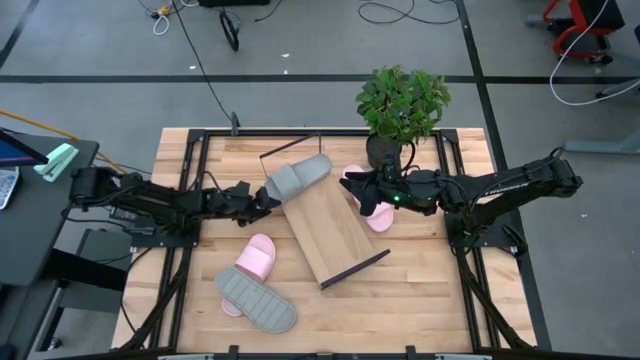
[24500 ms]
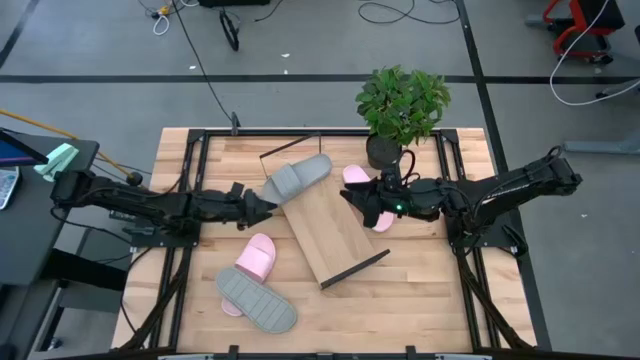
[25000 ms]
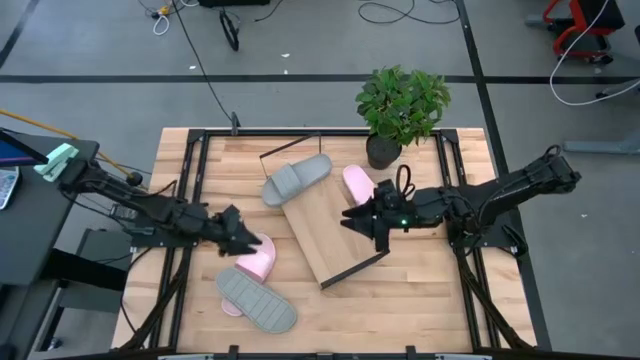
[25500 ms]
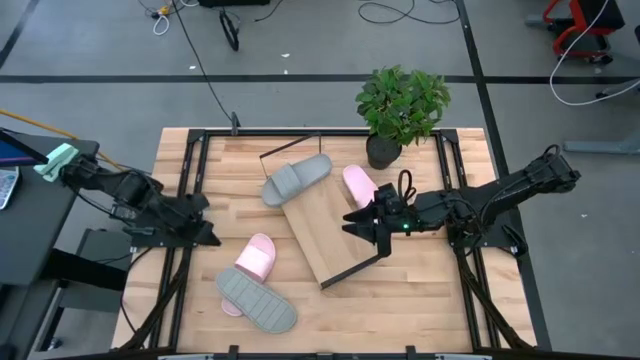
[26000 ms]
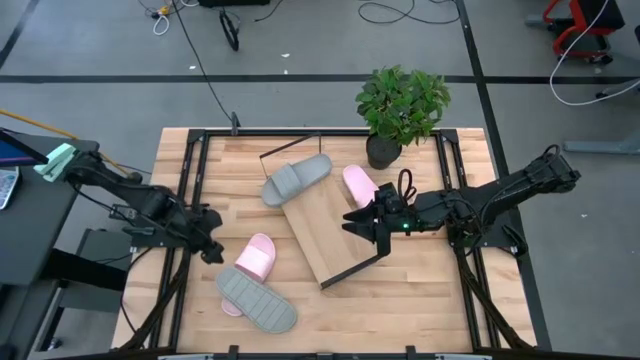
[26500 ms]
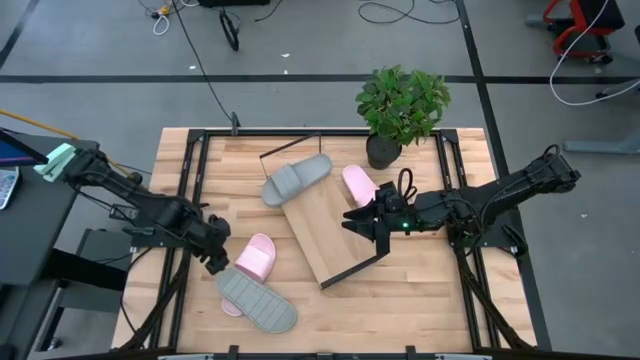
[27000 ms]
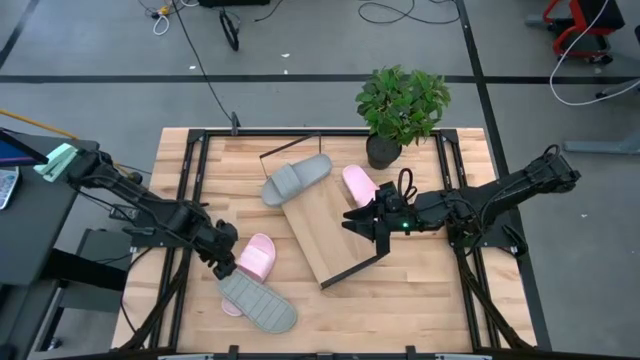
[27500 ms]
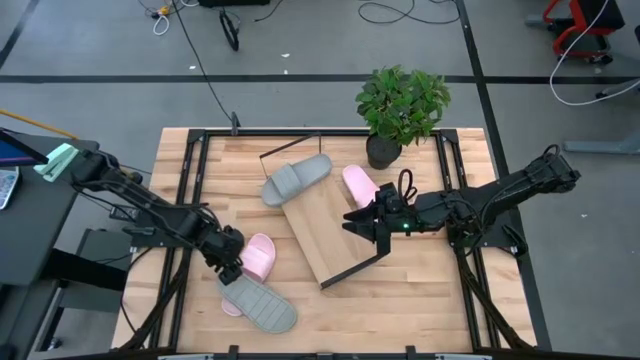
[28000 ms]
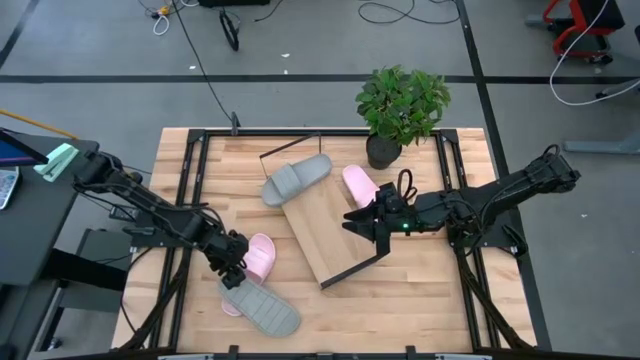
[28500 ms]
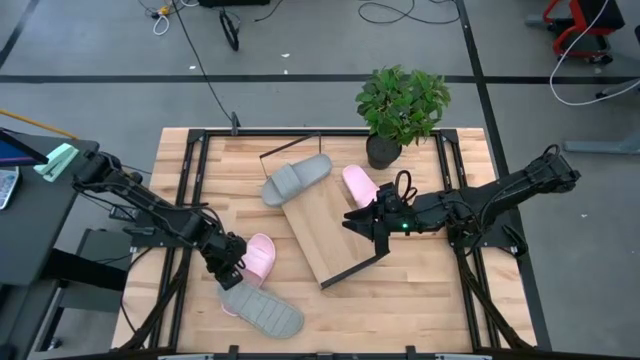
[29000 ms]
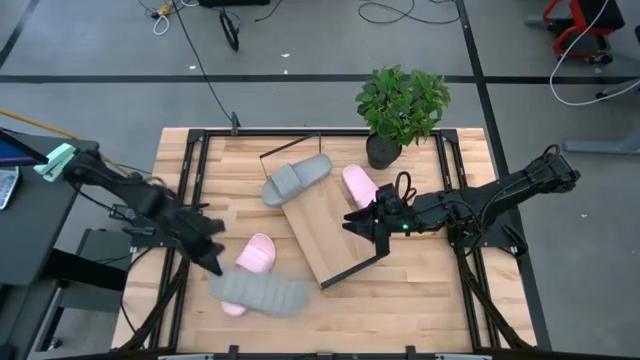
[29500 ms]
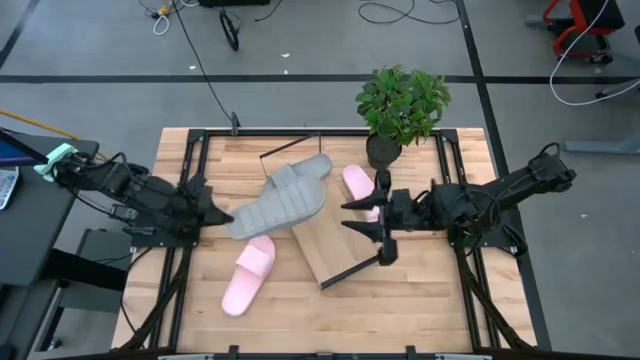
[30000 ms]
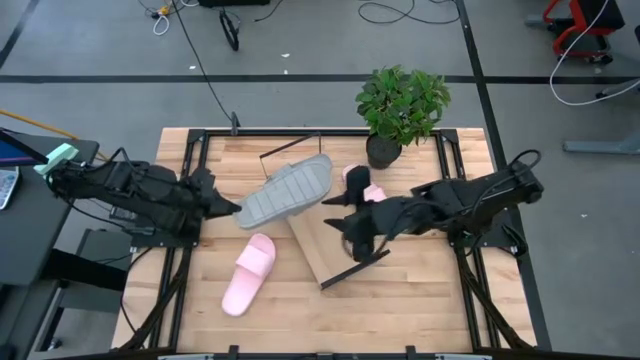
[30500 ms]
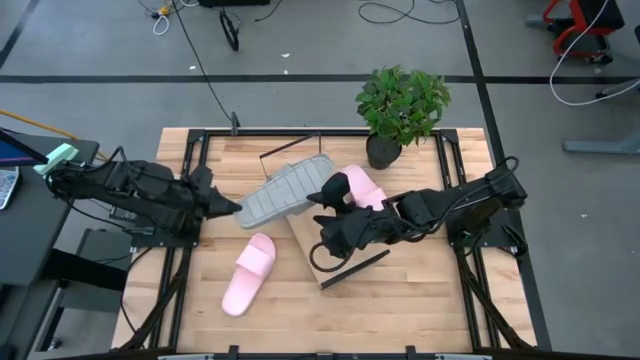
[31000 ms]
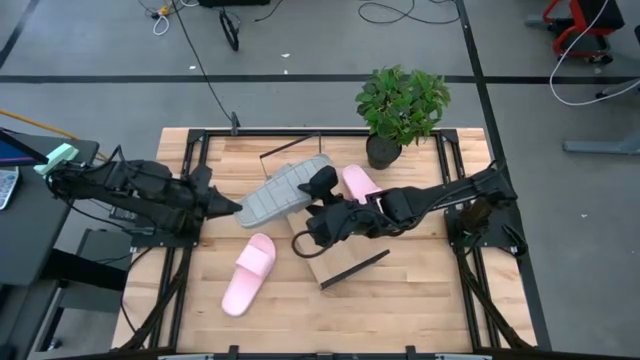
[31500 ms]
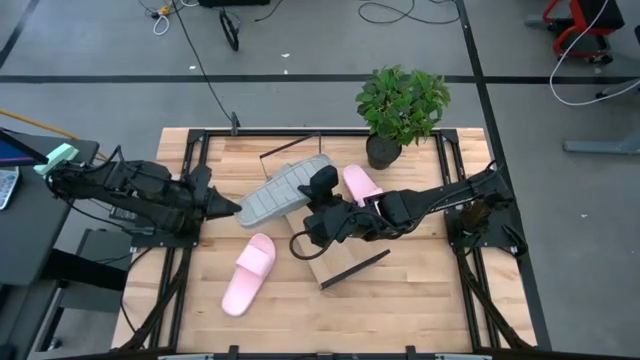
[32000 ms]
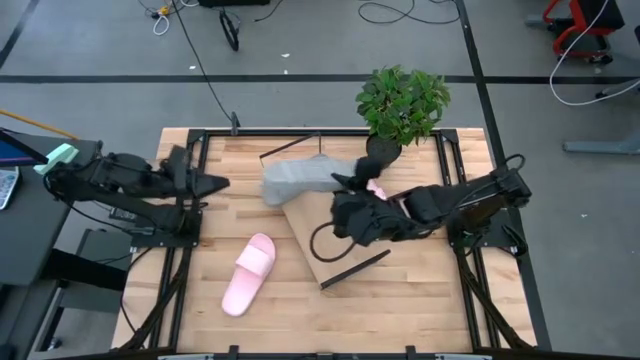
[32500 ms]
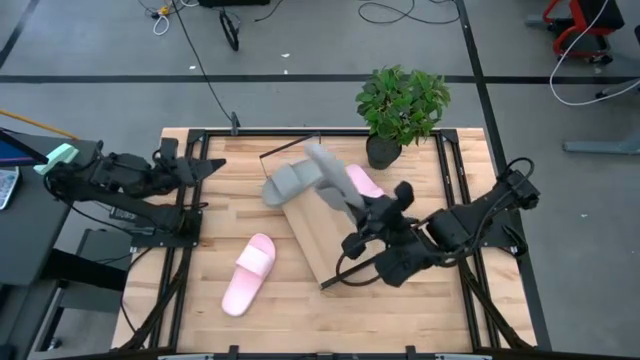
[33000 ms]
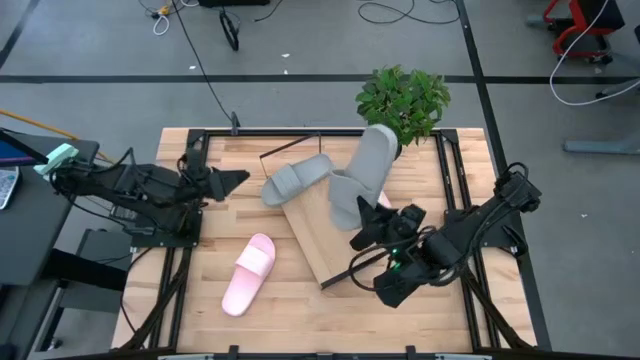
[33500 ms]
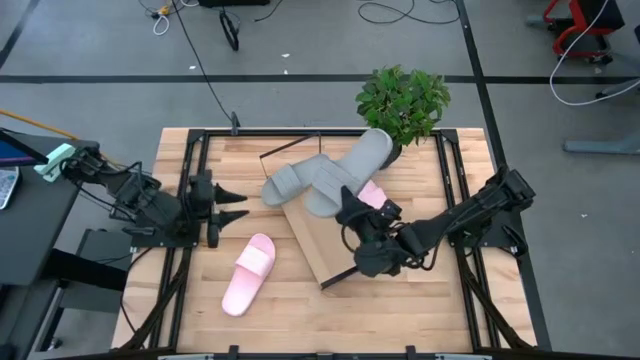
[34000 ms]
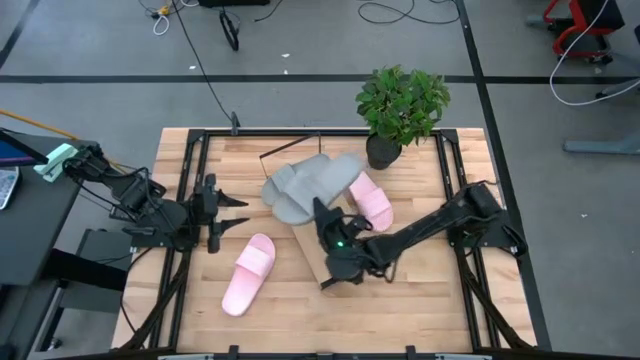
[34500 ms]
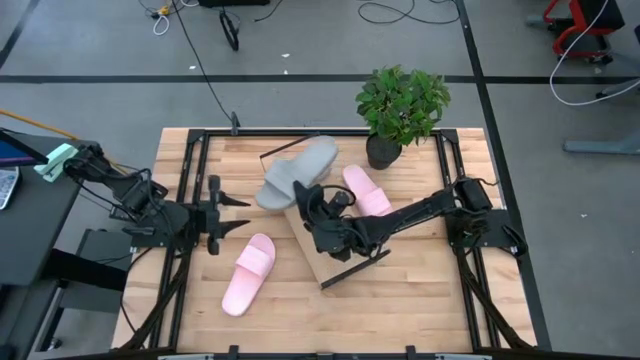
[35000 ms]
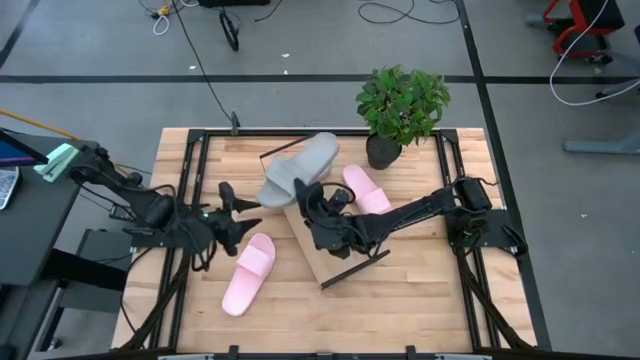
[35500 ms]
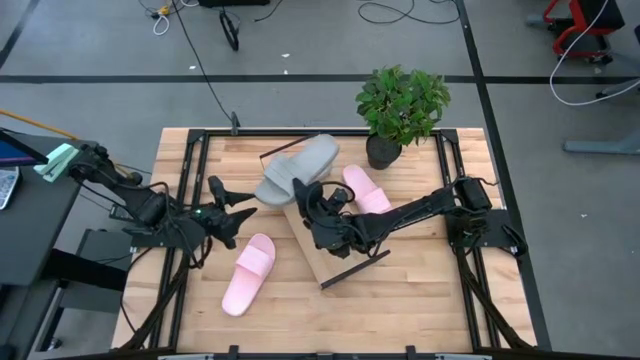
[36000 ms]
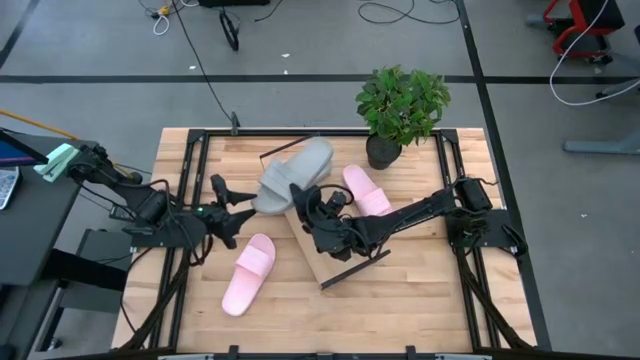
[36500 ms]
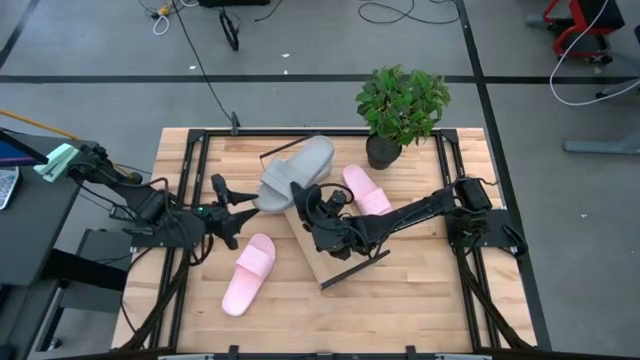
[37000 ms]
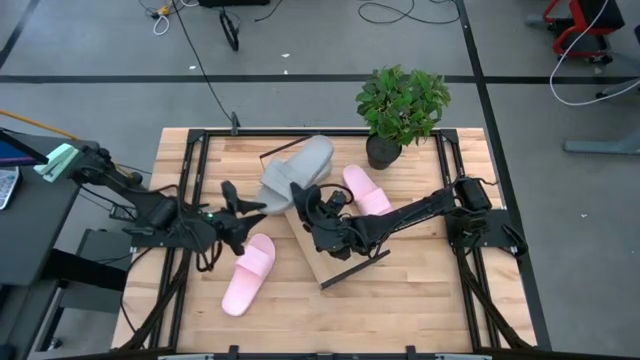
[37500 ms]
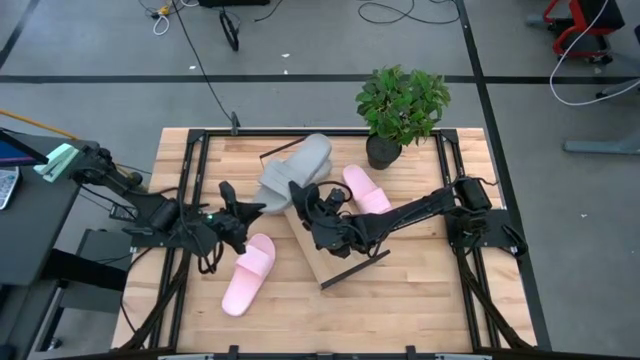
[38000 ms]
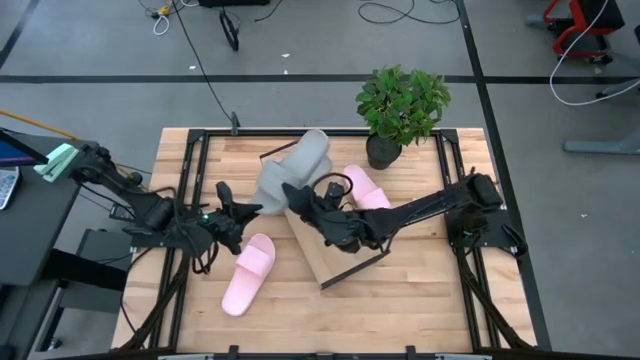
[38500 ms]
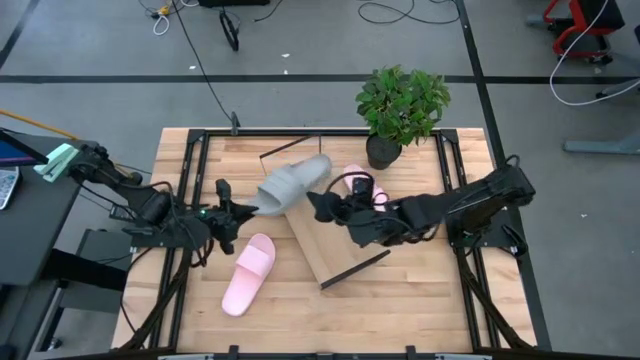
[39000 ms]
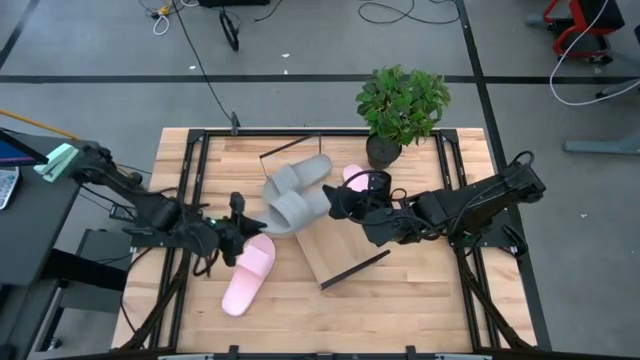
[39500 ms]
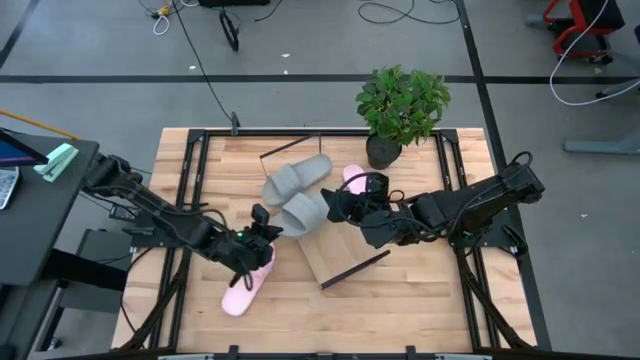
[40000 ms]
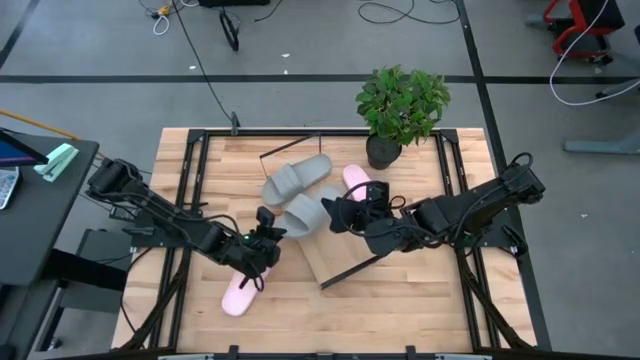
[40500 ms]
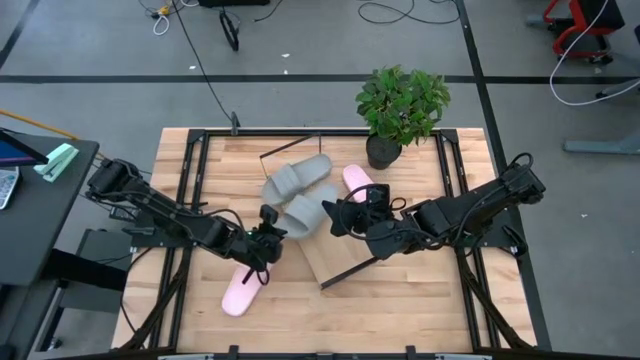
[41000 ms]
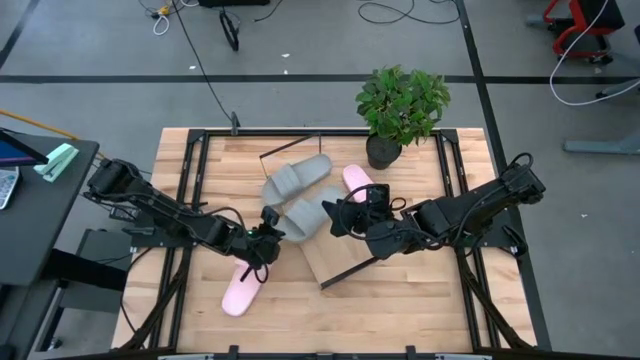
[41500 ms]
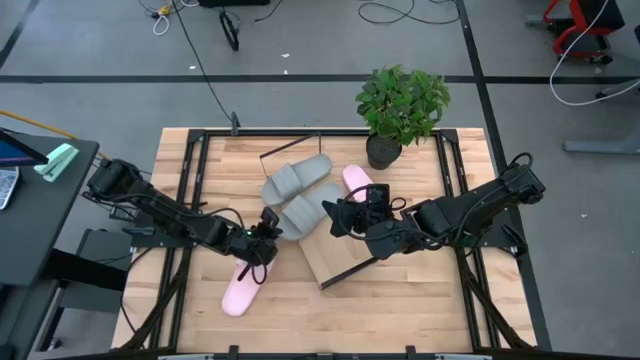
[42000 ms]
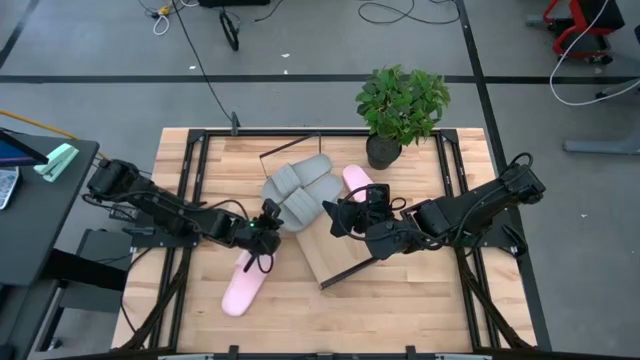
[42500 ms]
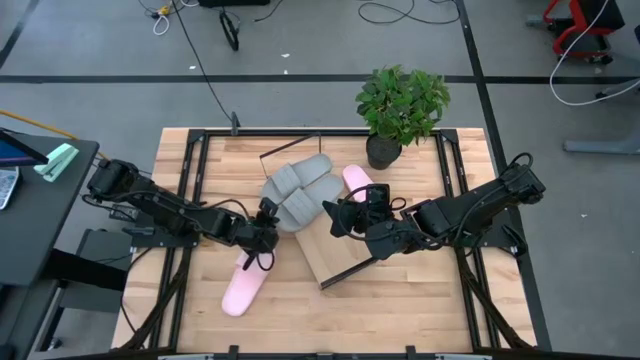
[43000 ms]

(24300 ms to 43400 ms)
Task: Pick and place slides into the shelf
Put the gray slides on the shelf

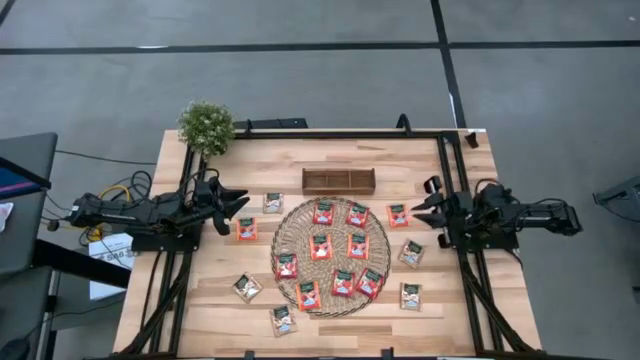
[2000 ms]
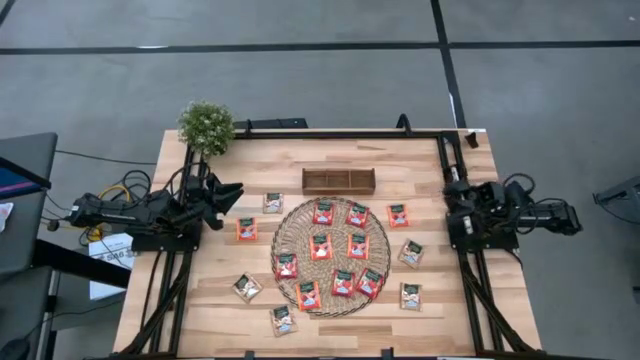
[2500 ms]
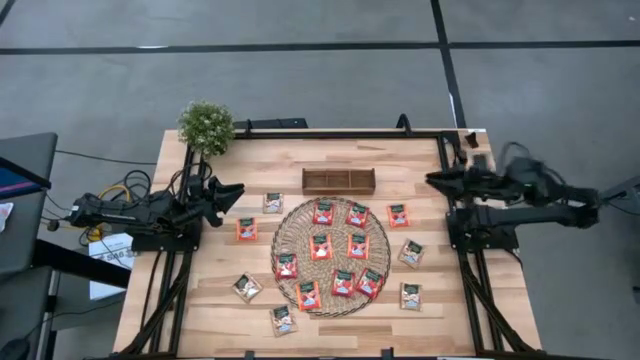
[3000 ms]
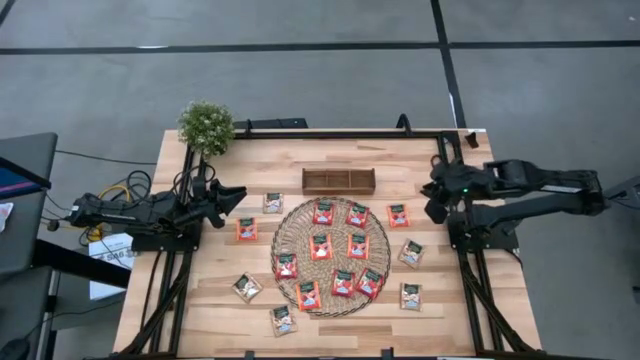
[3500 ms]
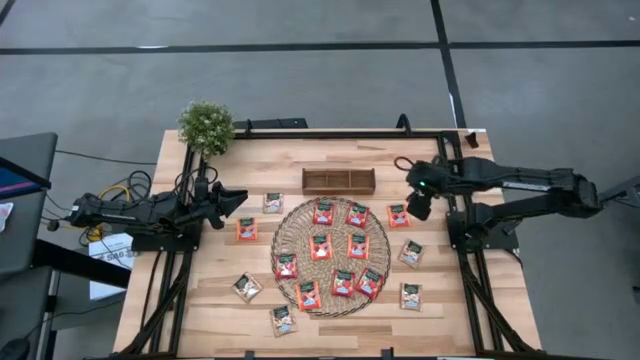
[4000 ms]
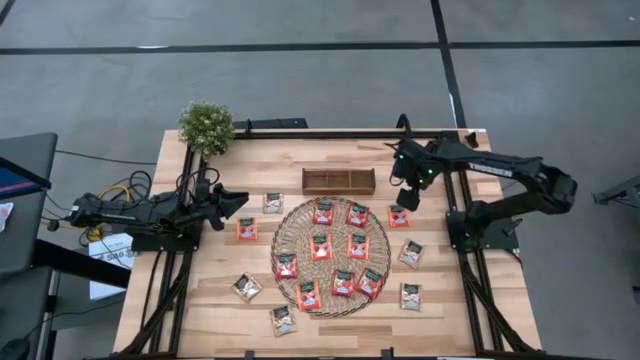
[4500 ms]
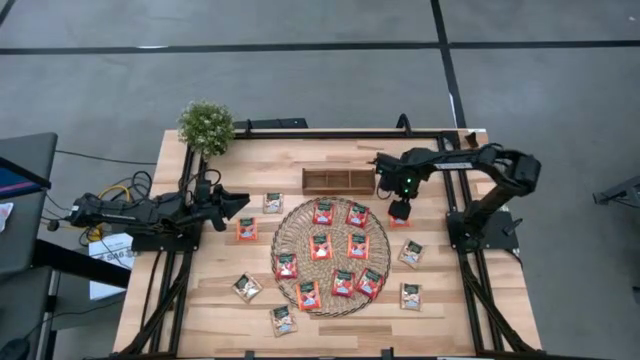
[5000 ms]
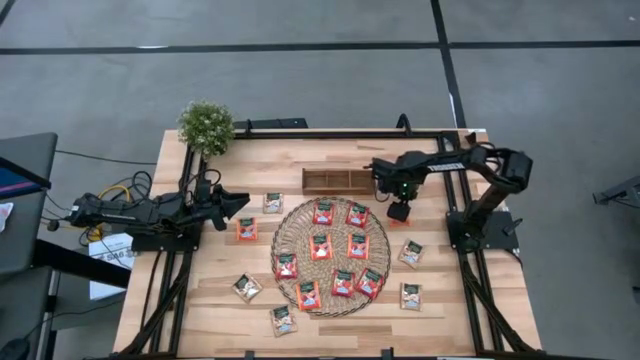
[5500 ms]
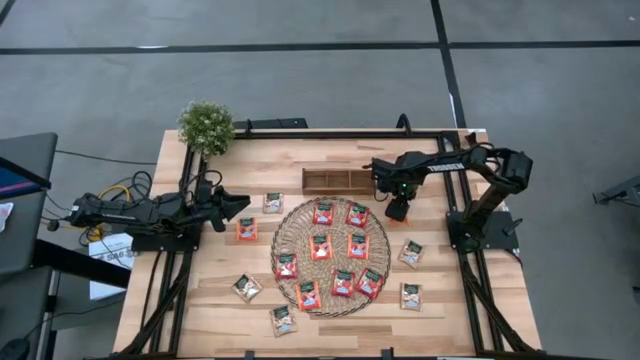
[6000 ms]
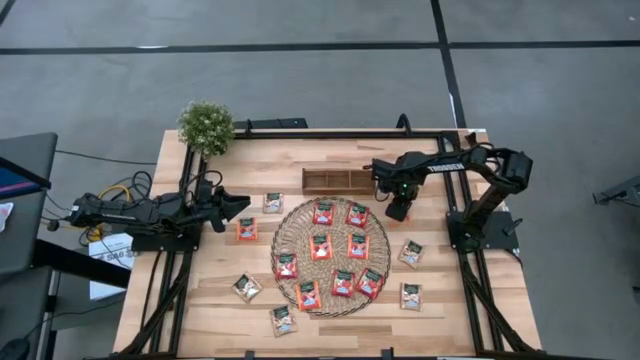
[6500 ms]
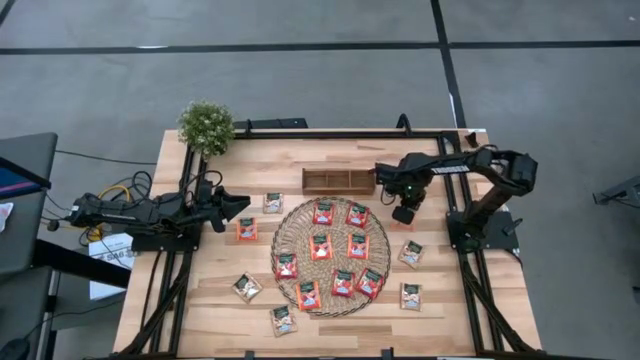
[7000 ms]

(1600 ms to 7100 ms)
Task: Pick & Place Tea
Put the orange tea bag into the right section of the wooden organizer
